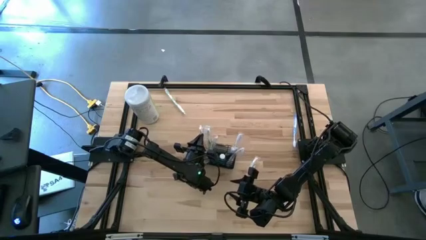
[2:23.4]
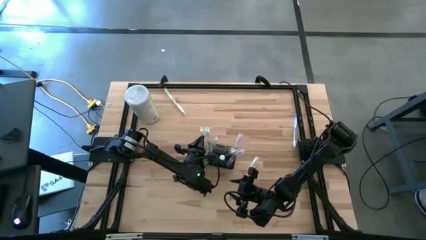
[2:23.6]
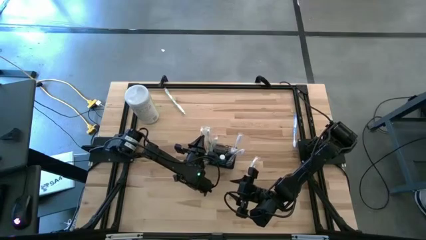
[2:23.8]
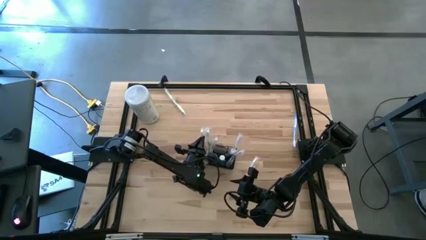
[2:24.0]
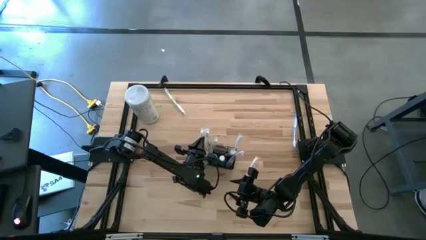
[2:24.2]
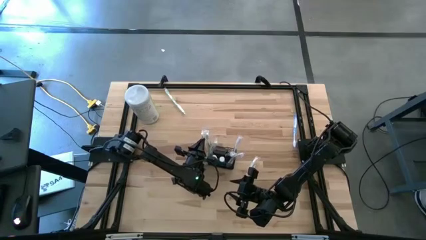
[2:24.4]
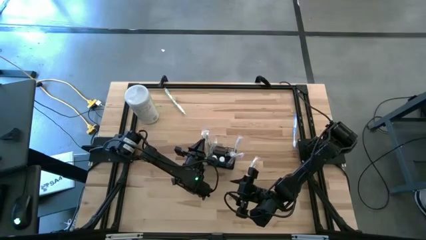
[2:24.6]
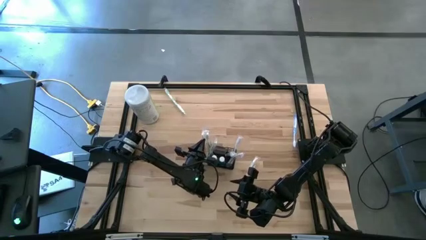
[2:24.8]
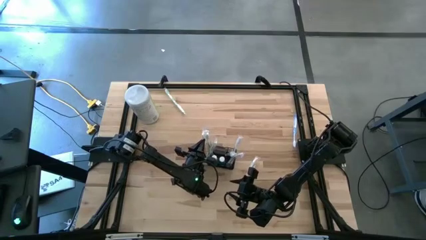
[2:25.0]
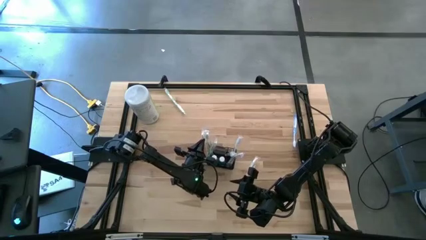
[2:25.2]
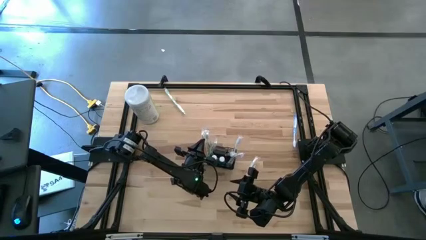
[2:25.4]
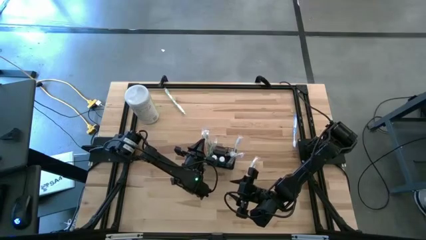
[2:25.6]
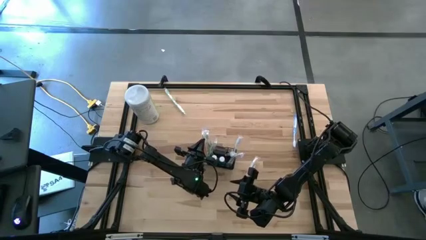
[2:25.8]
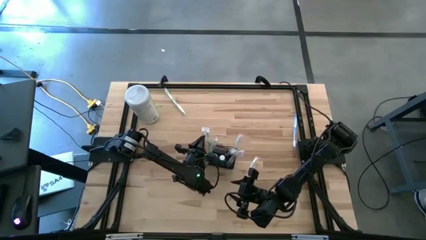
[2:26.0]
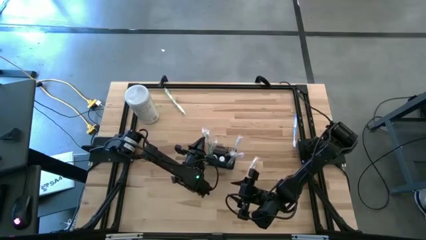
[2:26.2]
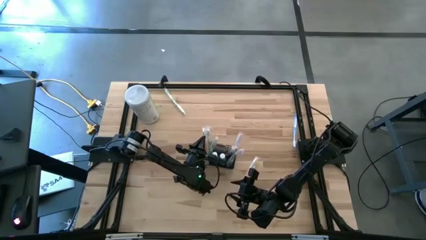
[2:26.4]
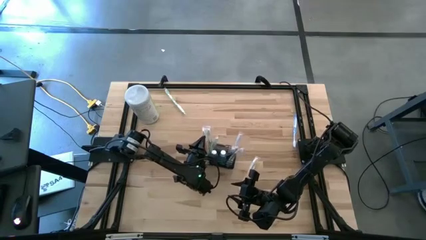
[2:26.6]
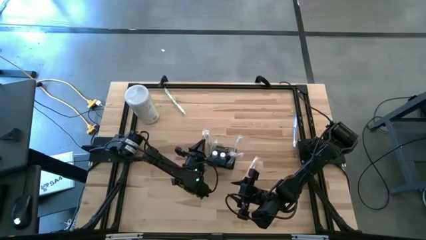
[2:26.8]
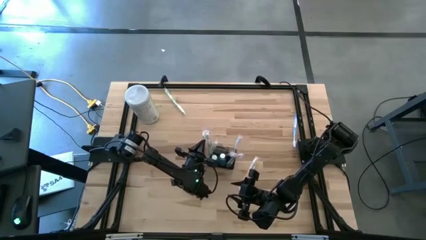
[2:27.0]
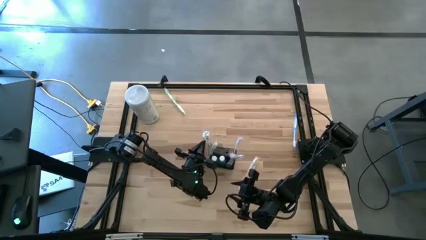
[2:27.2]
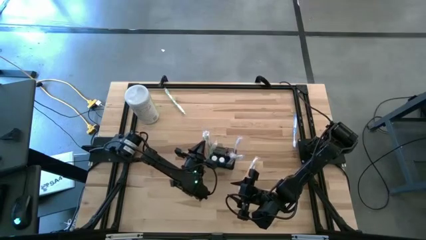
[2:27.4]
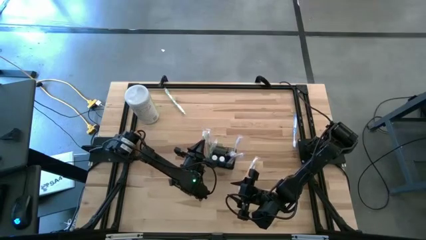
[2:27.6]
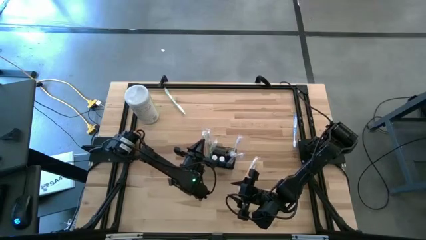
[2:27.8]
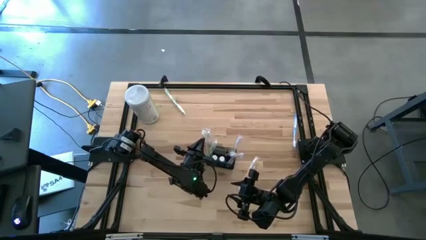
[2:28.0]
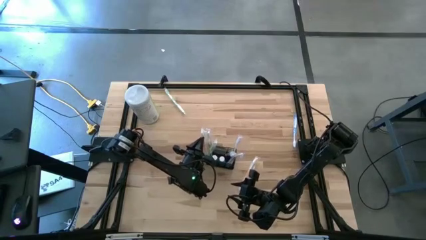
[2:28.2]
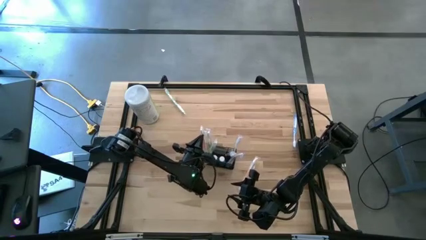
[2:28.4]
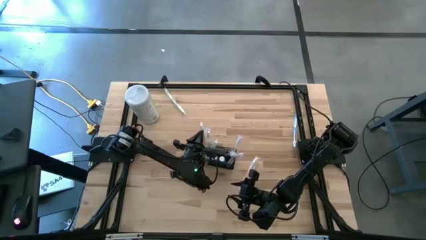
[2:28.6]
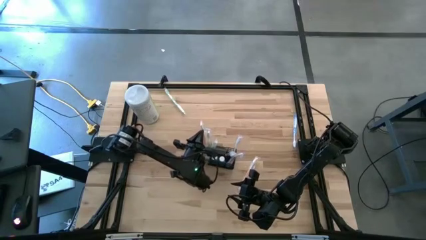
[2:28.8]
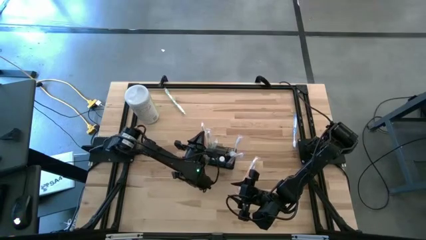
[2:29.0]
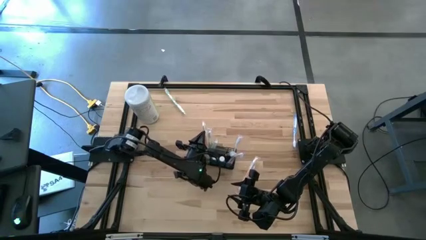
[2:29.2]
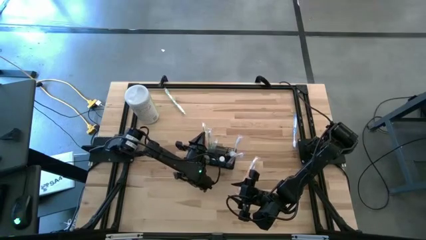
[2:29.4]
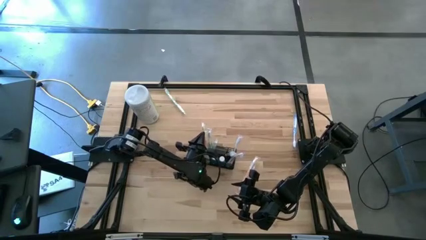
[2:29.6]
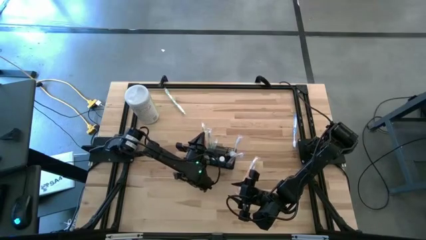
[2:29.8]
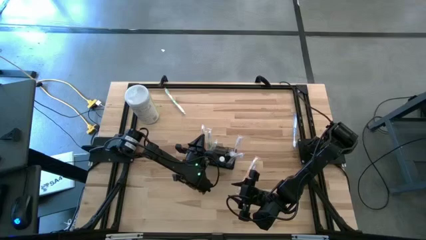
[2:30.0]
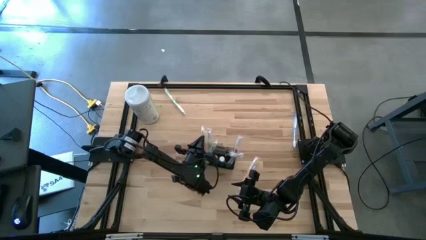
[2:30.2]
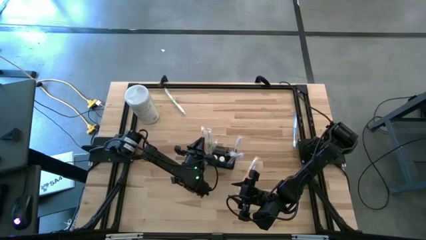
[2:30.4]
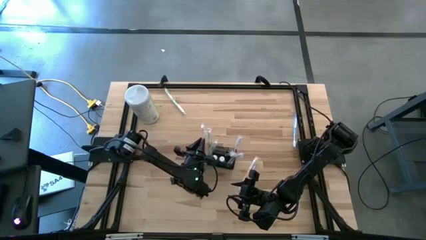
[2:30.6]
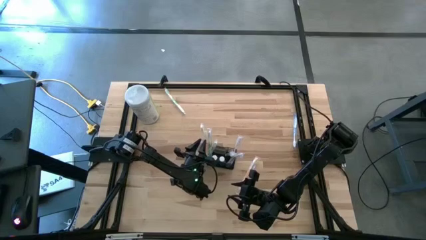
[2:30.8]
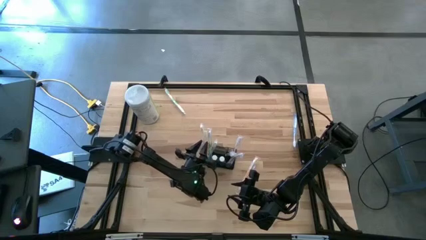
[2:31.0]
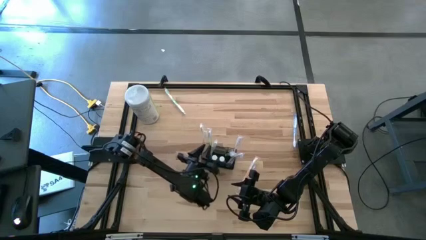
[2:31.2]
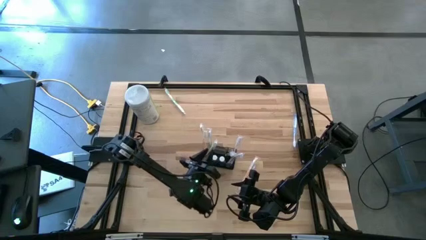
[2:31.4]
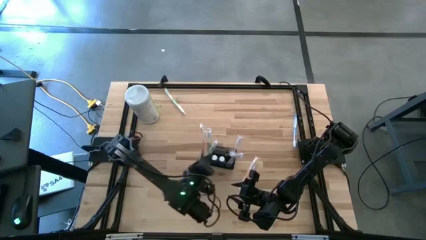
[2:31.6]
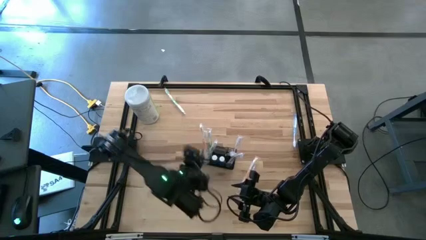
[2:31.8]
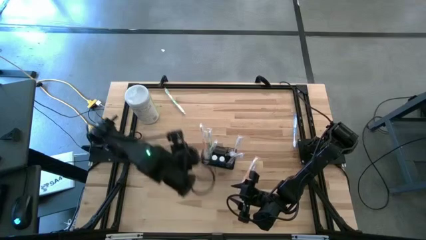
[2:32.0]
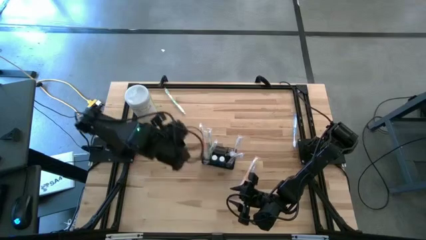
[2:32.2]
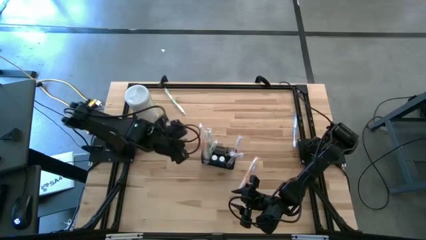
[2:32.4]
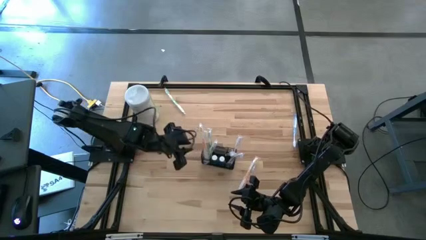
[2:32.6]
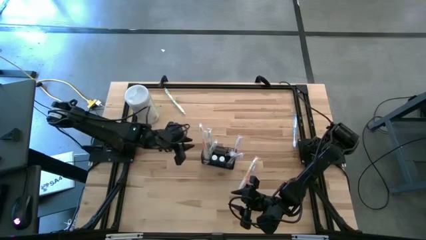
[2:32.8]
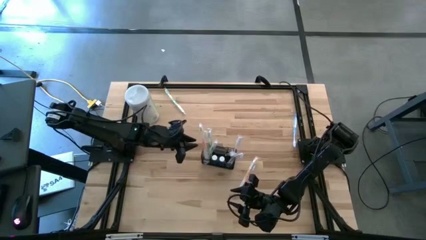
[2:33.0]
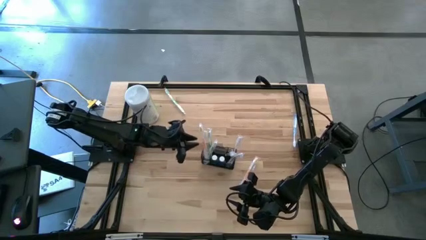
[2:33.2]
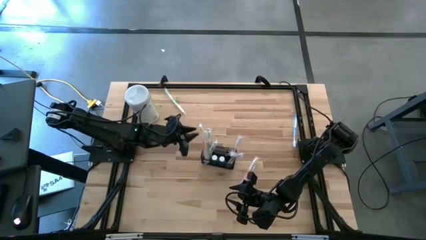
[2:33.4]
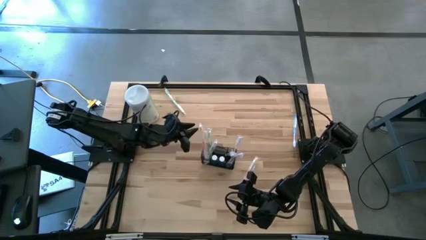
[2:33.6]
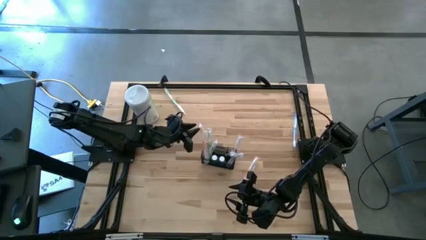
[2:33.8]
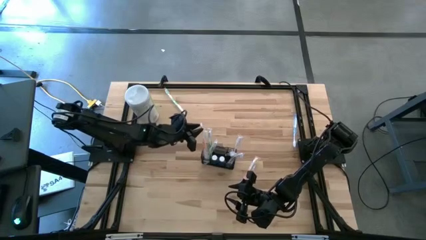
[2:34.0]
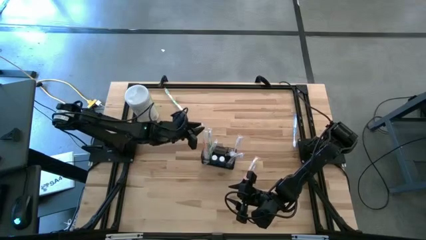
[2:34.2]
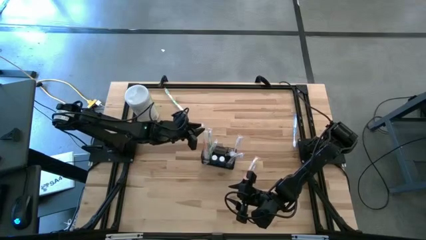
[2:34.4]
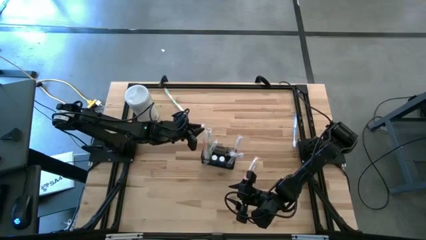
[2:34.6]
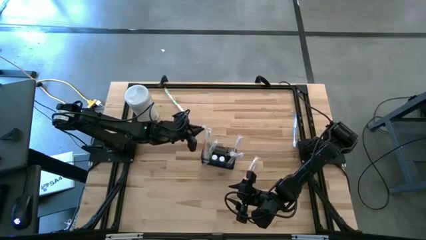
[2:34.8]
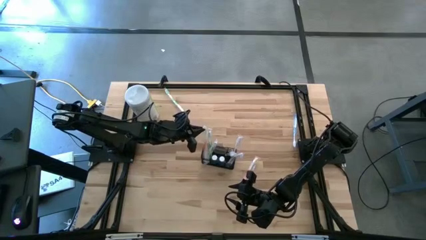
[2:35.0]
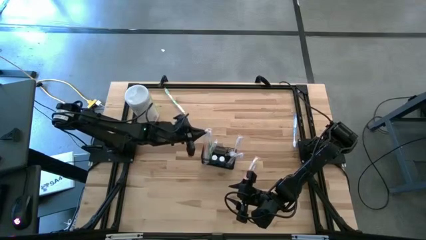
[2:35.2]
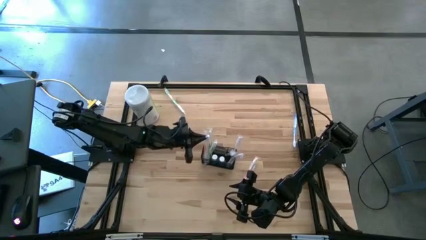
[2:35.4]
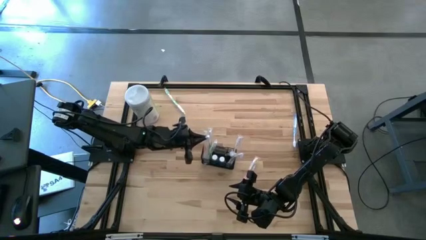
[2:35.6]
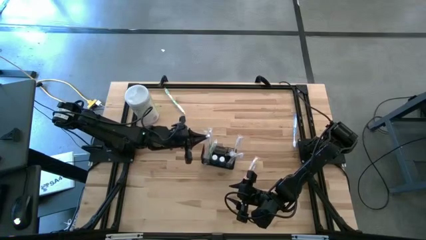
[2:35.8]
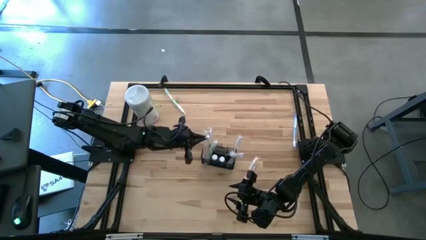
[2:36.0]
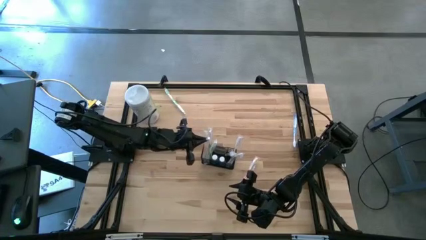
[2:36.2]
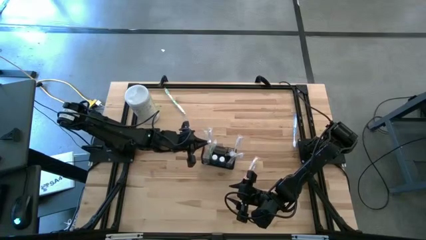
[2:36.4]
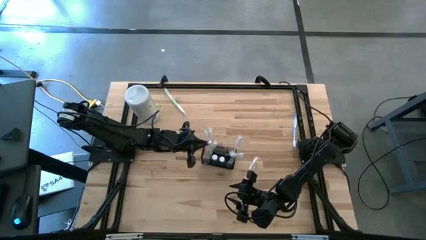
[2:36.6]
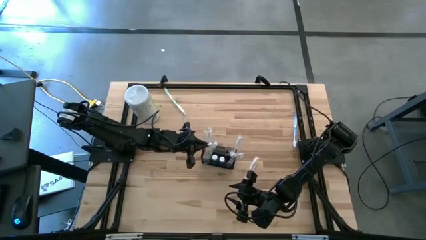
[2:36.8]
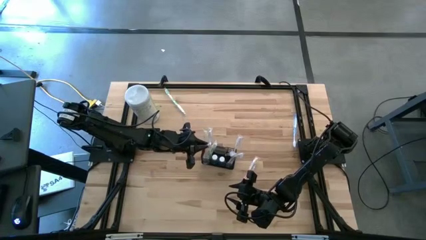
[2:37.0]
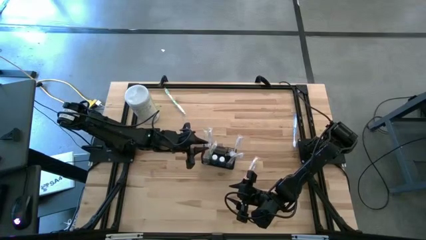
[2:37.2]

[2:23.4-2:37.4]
Task: Pick & Place toothbrushing station
Put the left orange toothbrush into the mesh organizer
